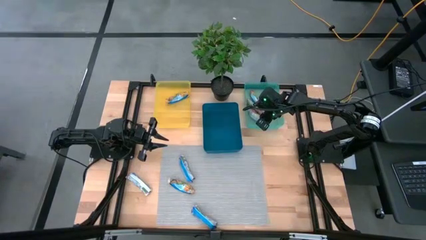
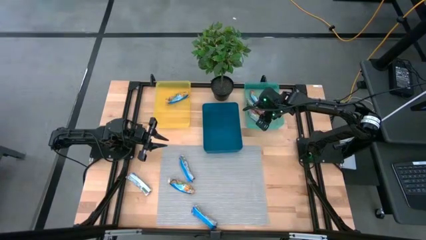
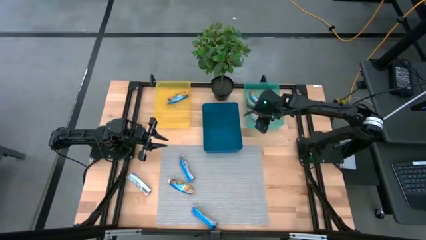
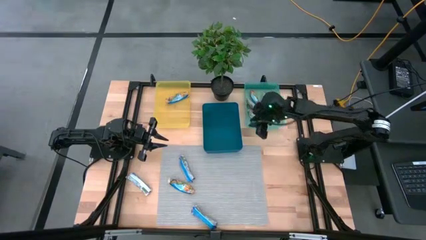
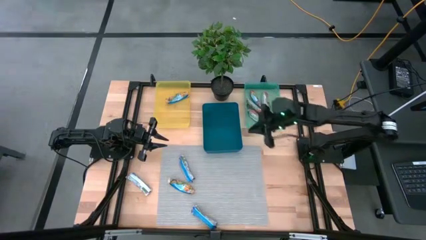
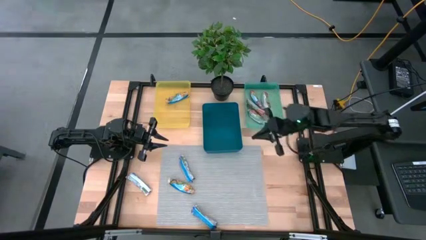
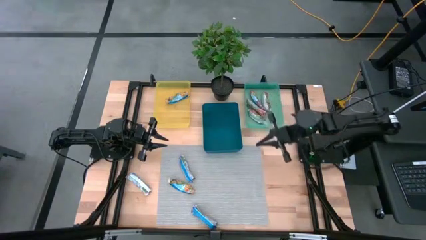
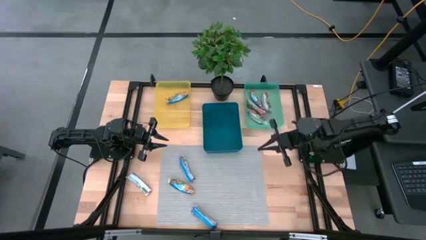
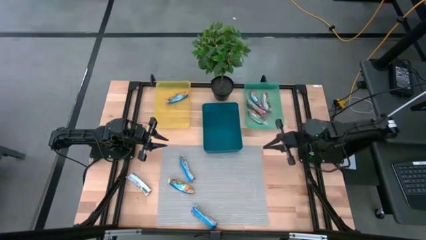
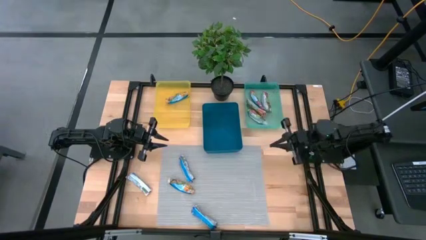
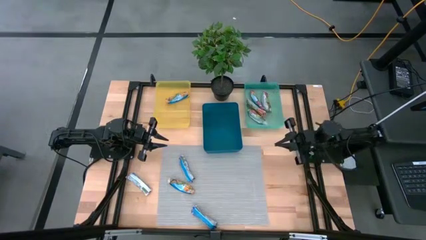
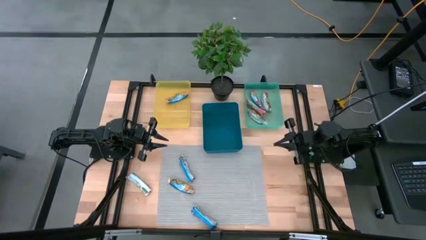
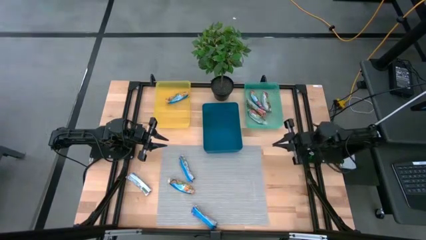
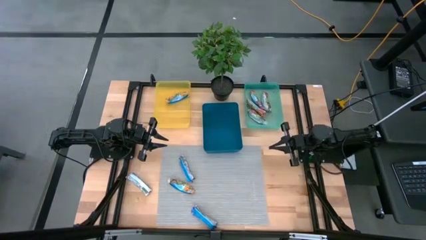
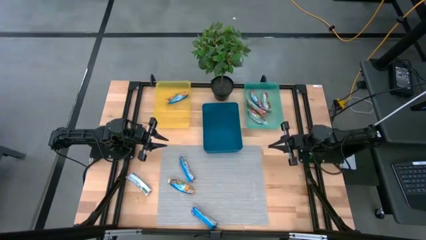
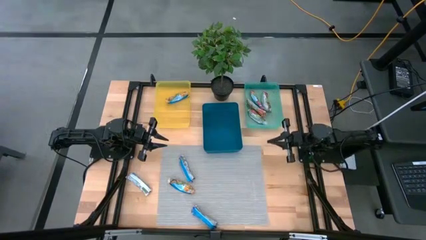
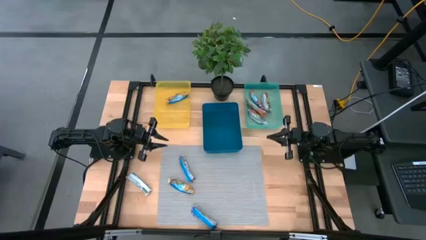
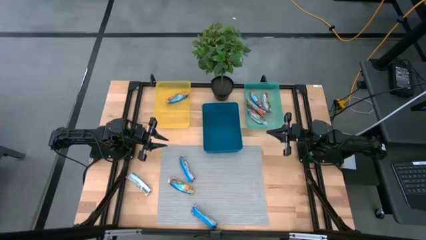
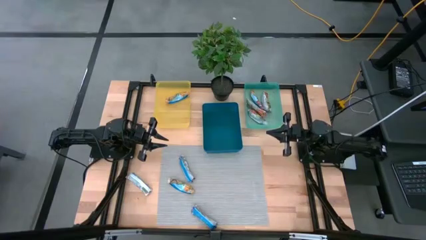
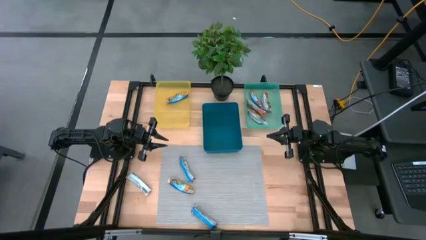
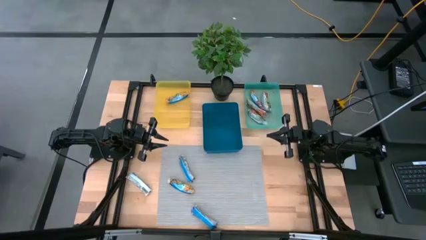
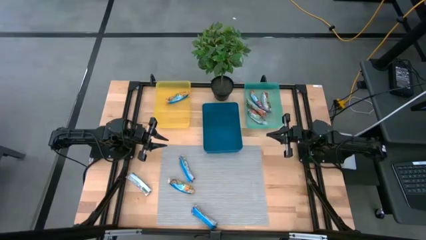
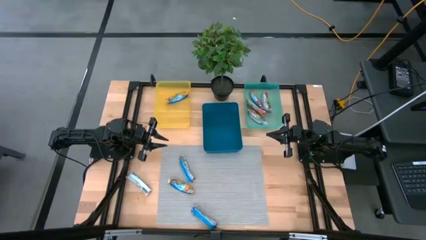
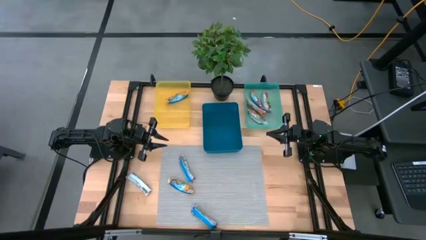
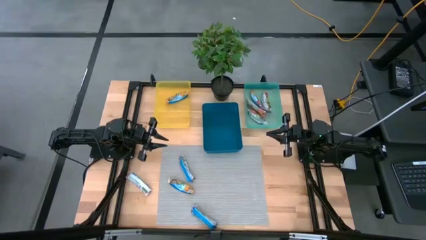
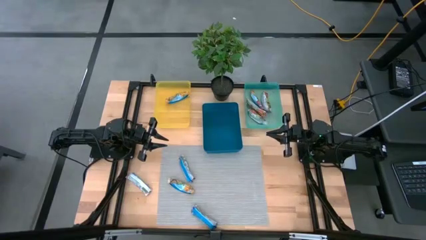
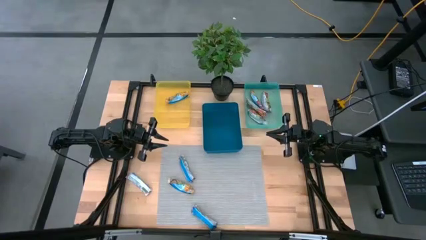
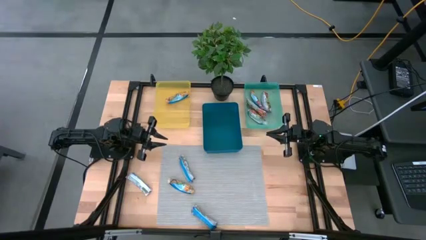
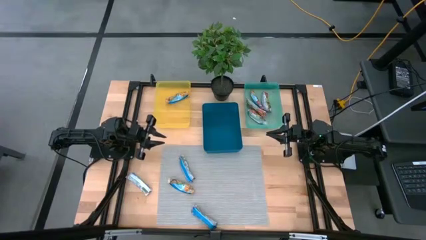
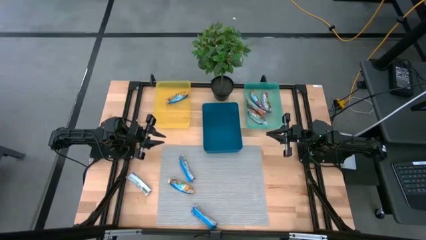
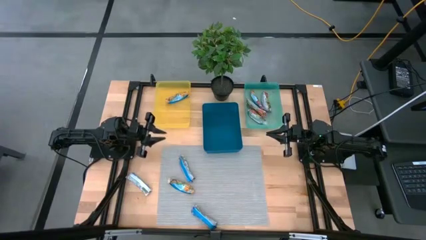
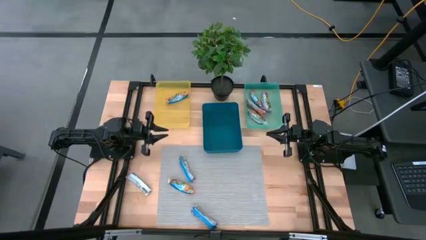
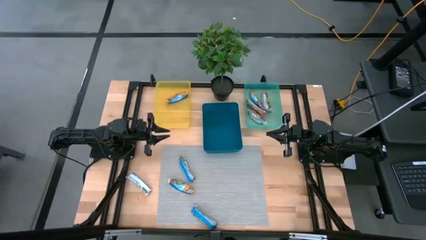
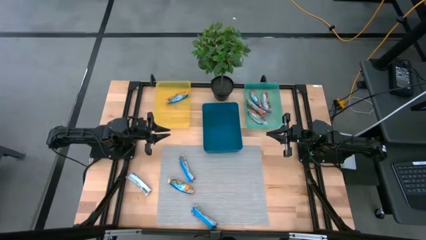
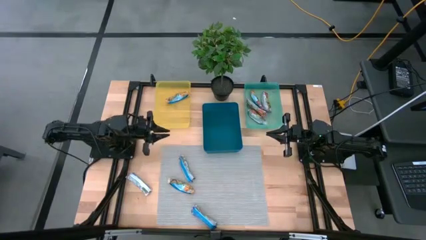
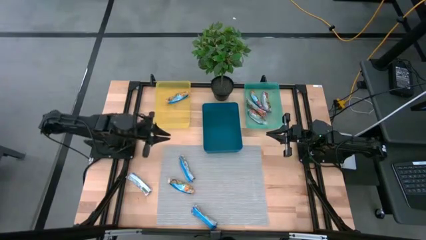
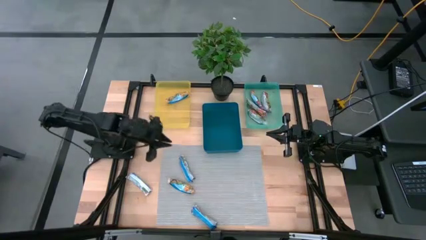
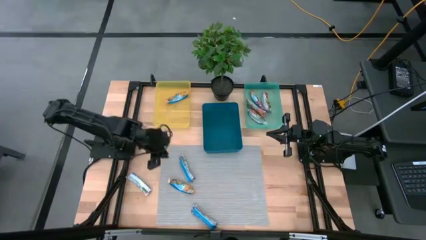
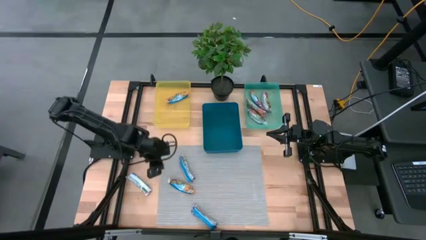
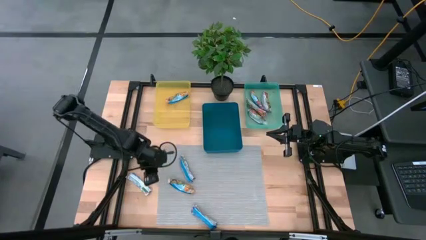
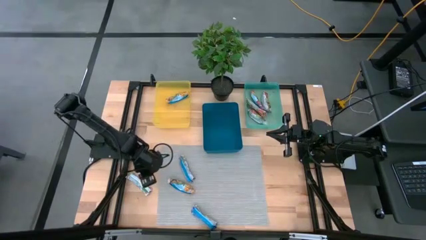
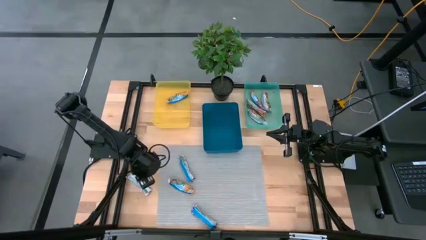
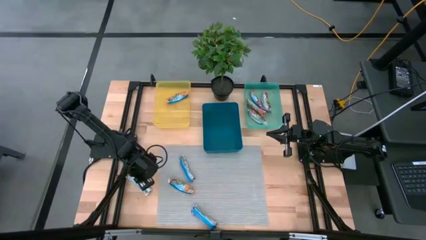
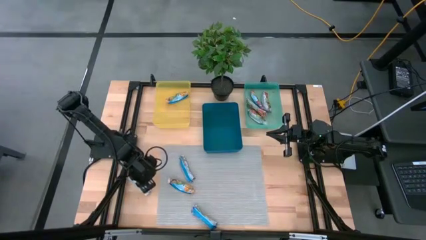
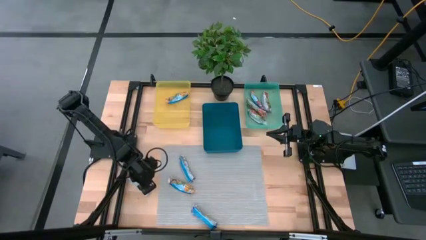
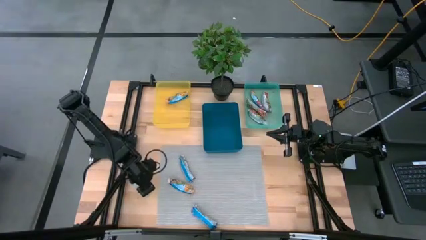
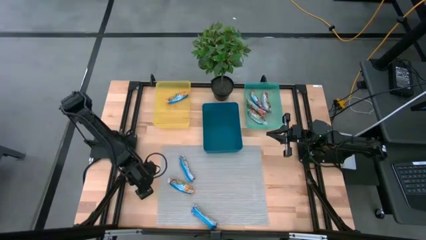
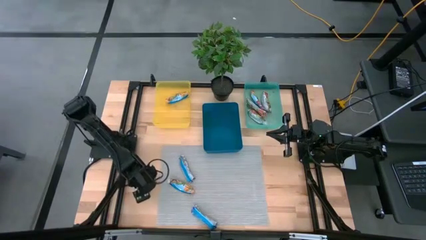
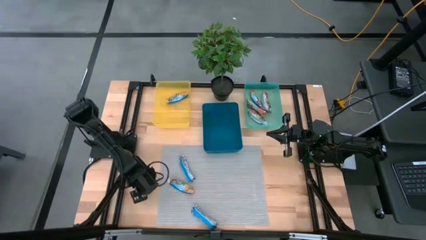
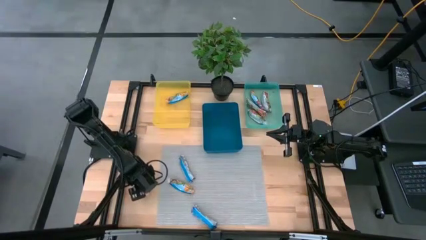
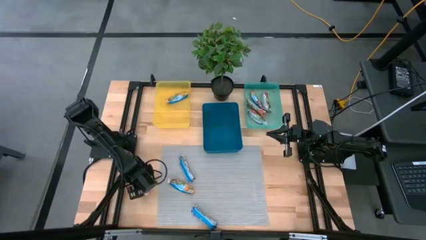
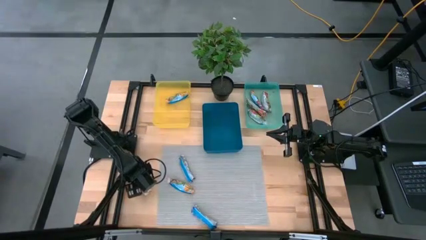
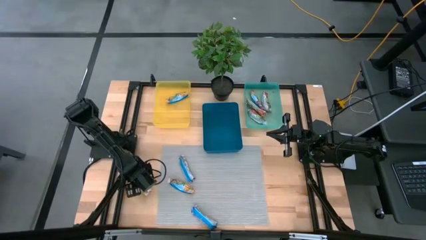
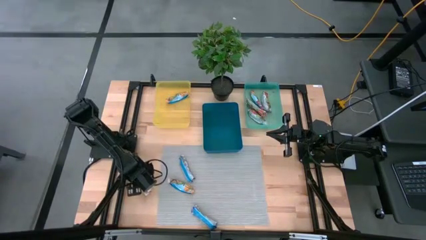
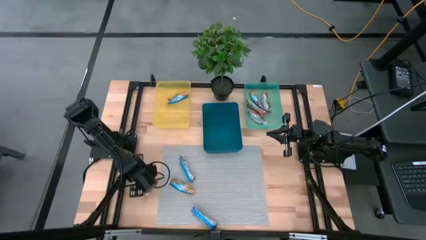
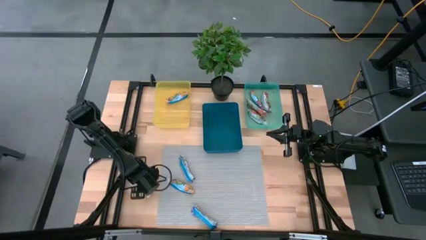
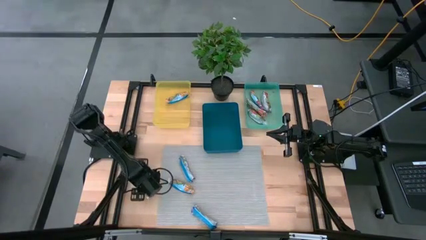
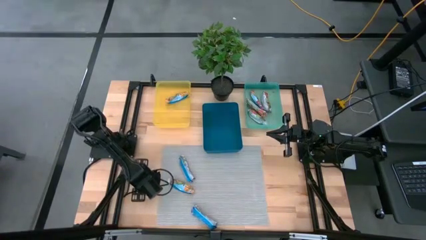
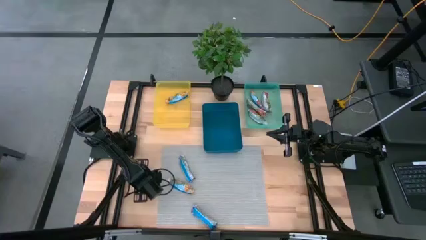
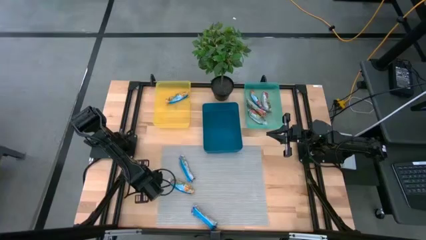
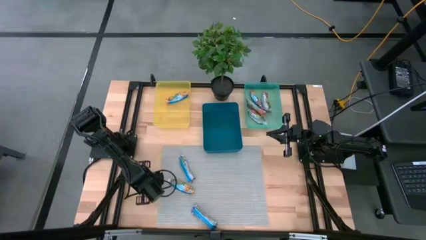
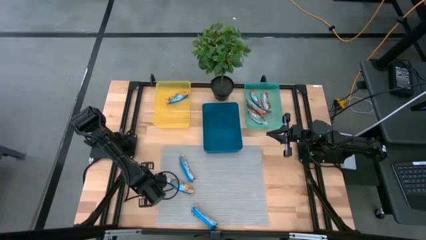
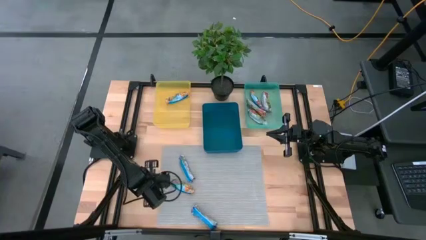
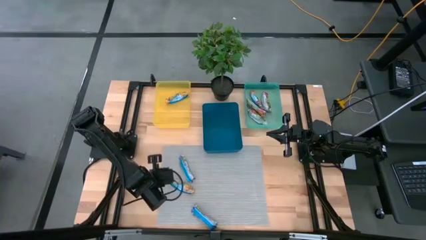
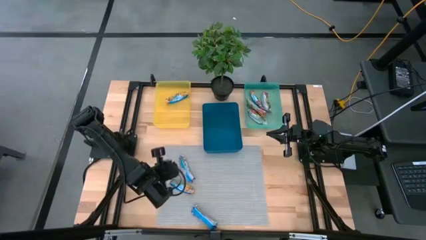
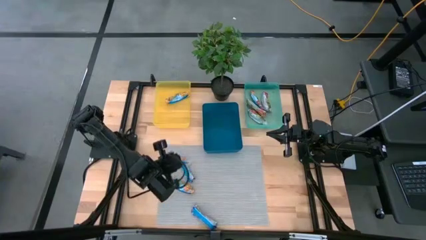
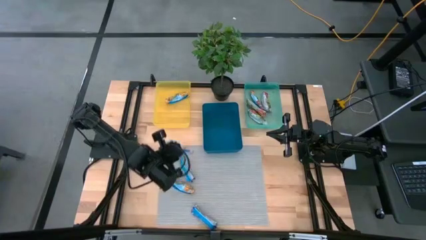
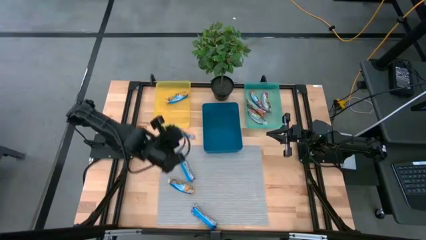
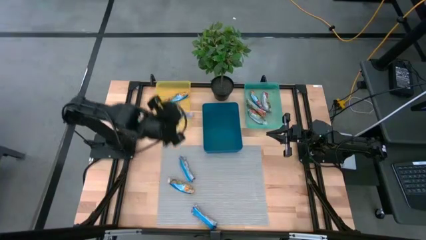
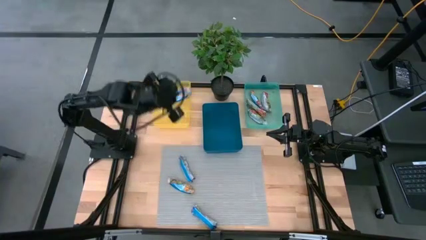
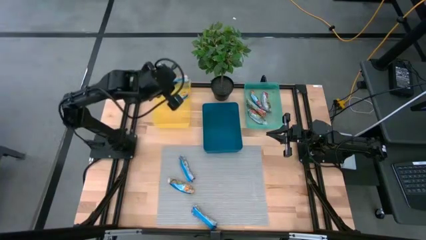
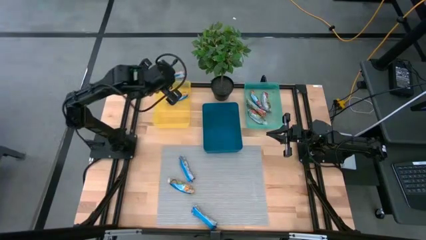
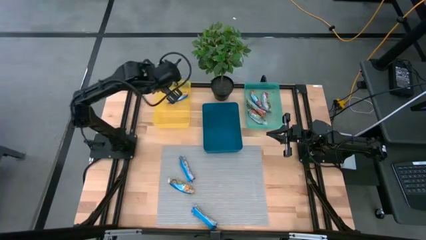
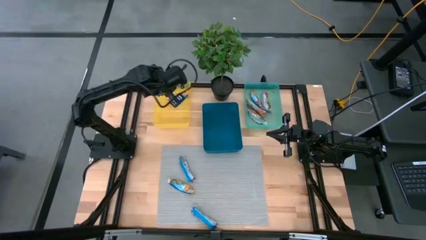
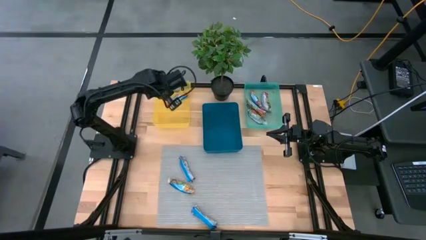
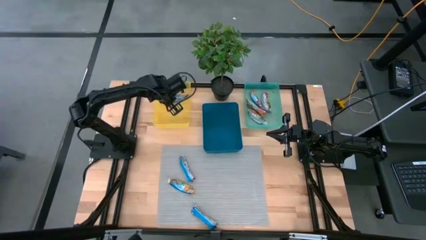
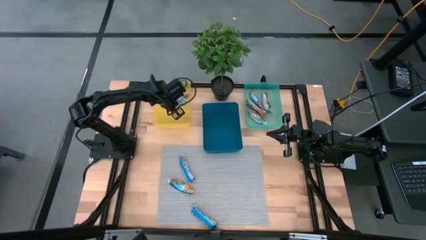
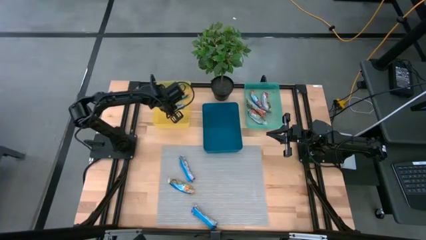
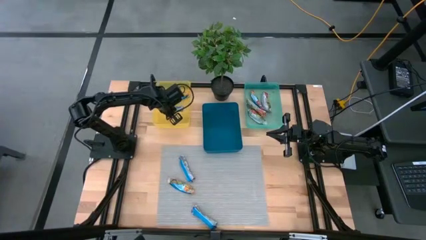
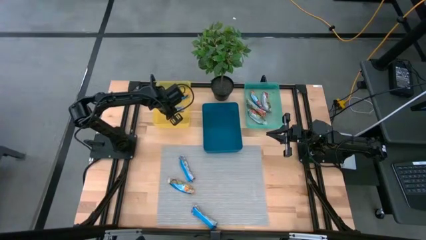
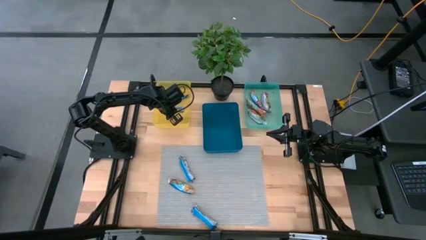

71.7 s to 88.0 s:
Task: Pick and place Granola Bars by type
Put the orange granola bar into the yellow bin
